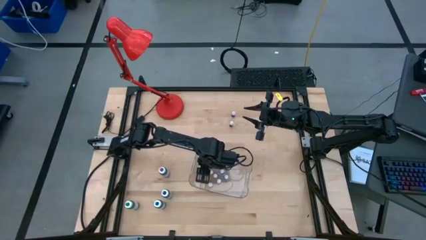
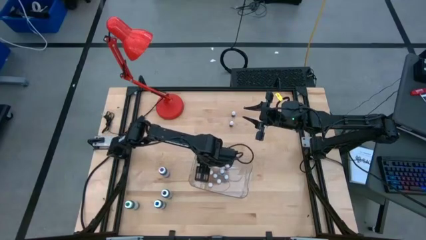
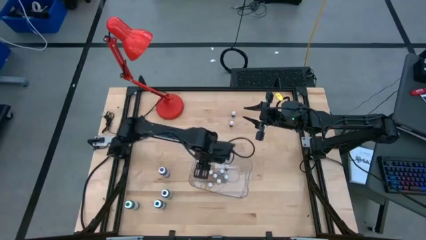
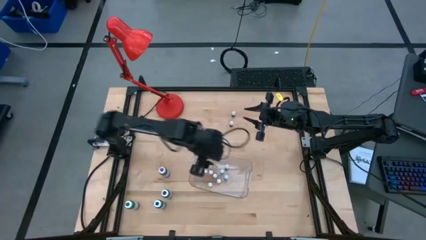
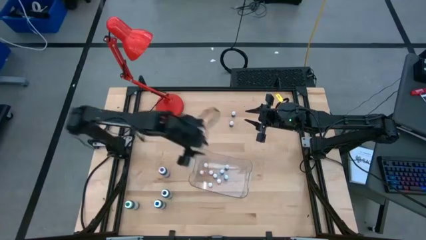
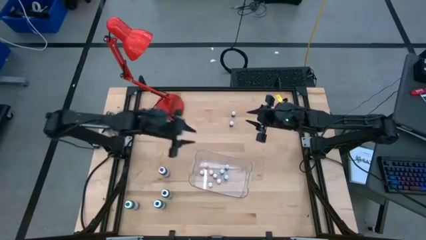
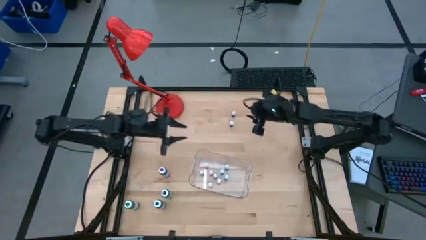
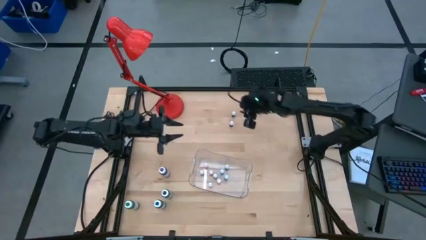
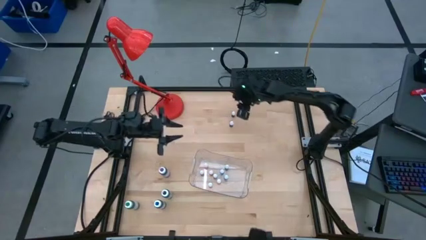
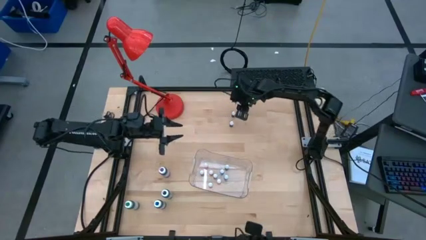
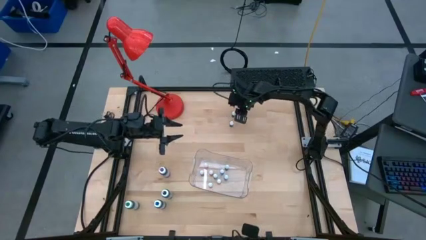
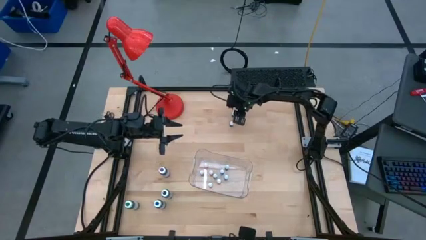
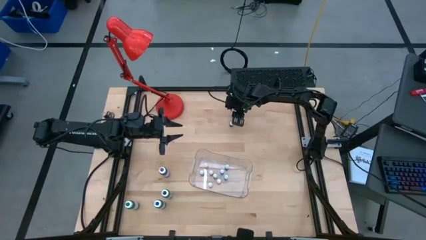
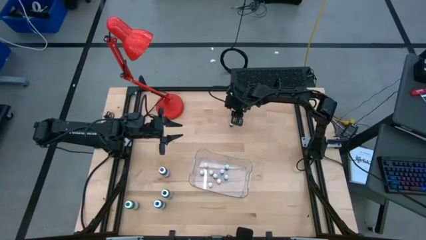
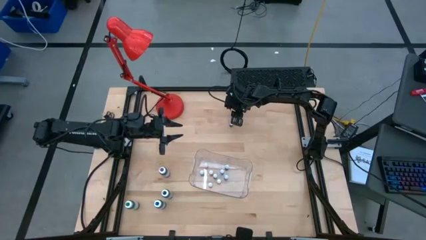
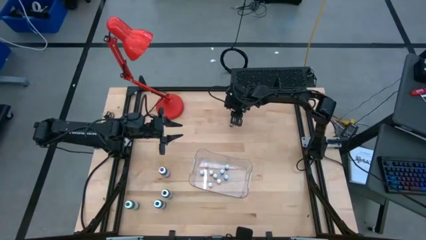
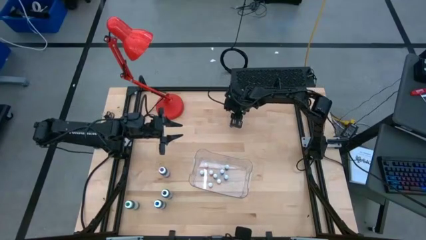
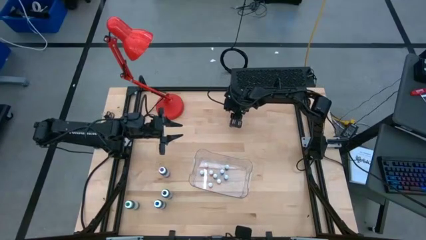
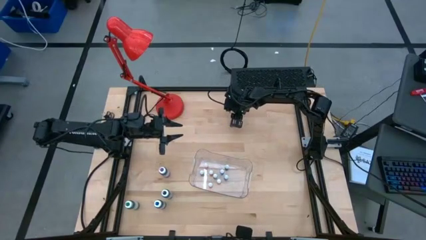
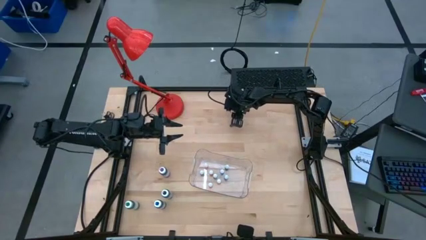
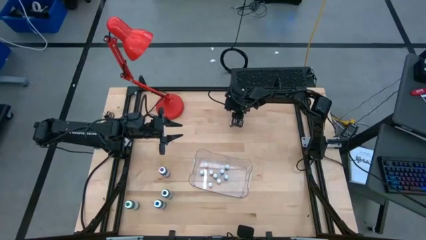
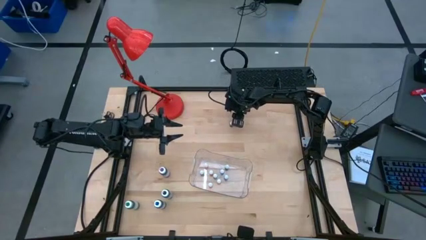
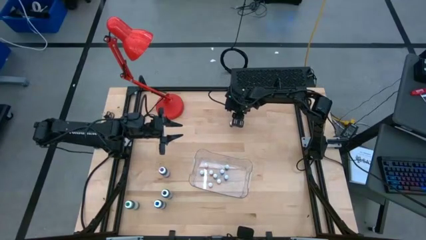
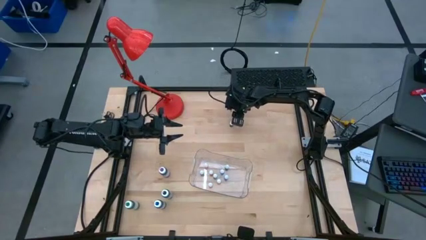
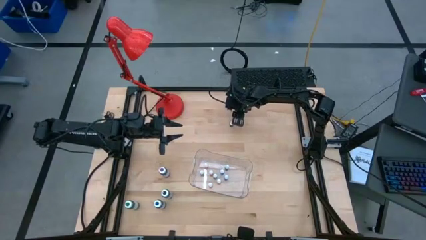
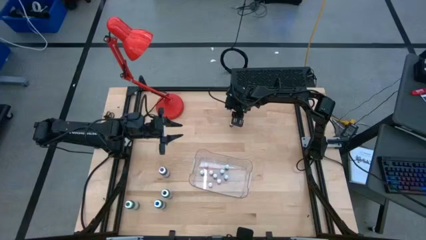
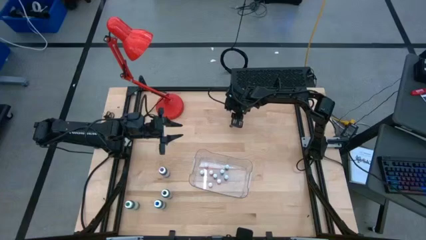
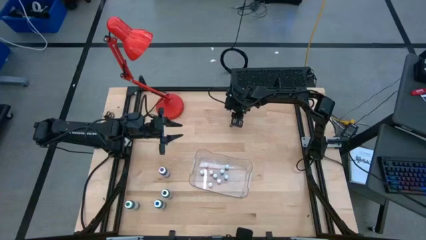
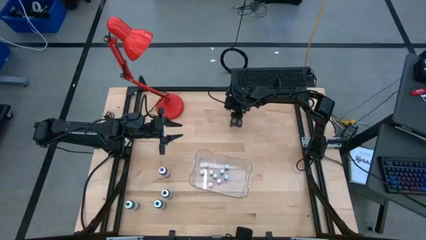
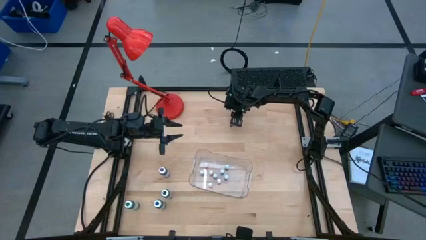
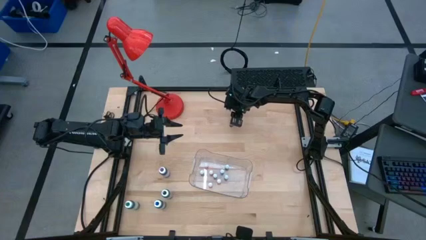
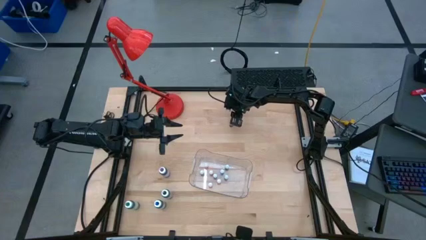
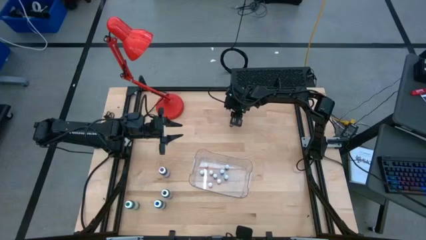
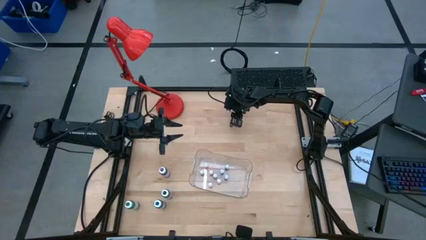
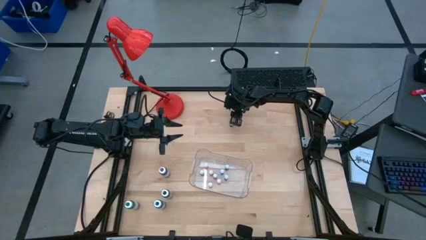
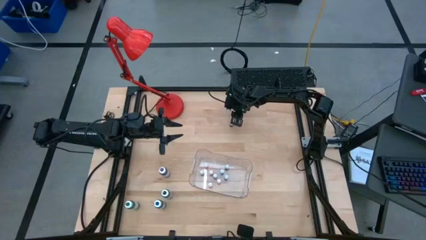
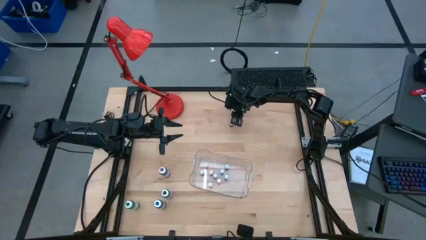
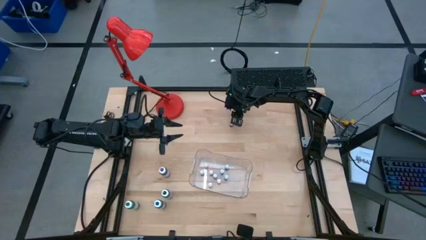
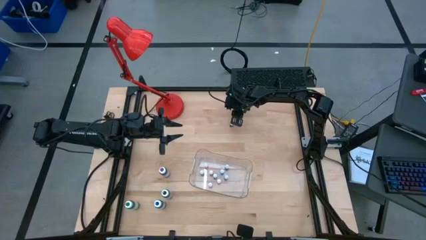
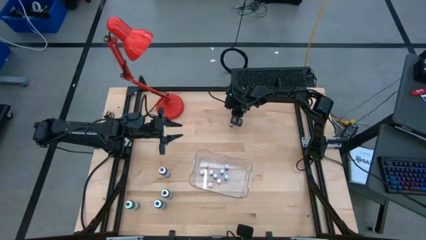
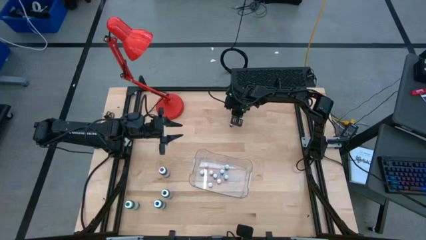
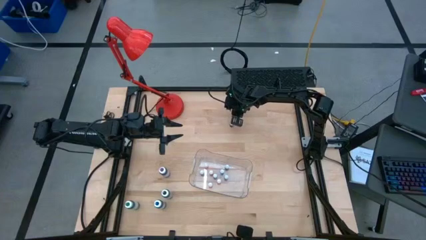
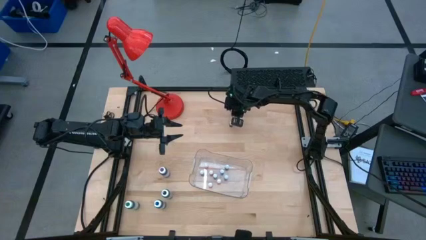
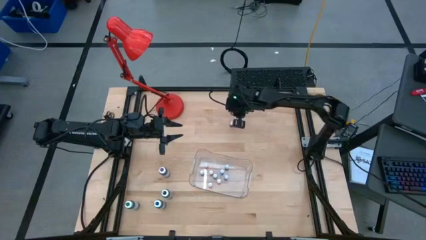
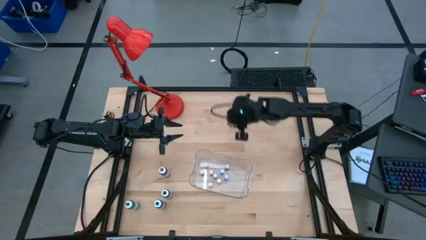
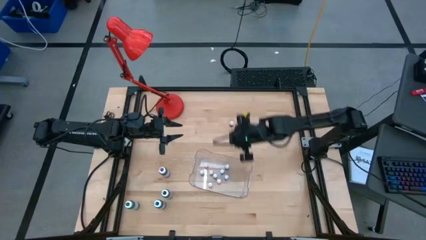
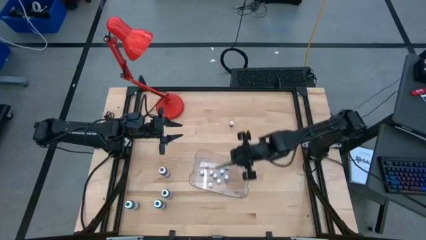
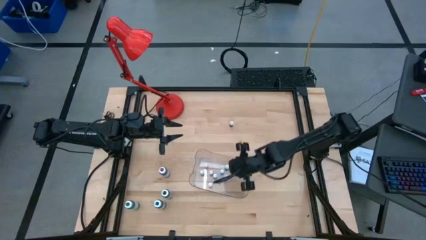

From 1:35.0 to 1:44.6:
Task: Pick & Place food coloring
Put the small blue food coloring bottle into the transparent bin

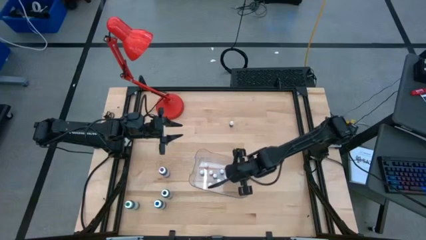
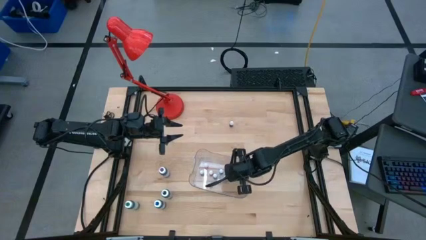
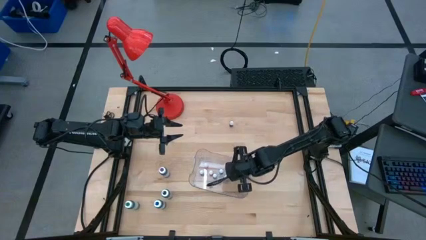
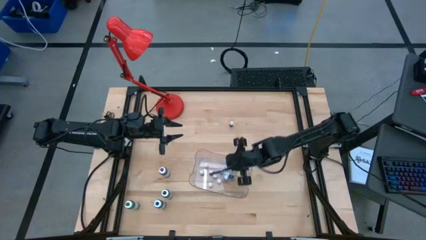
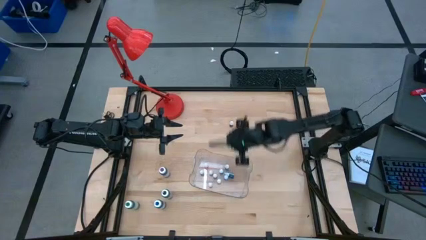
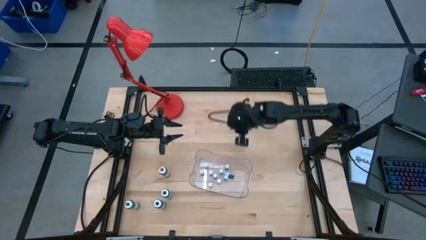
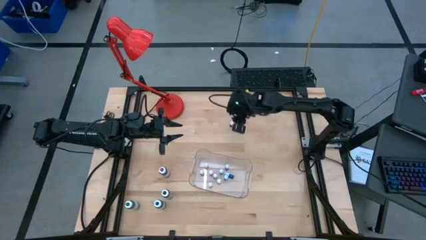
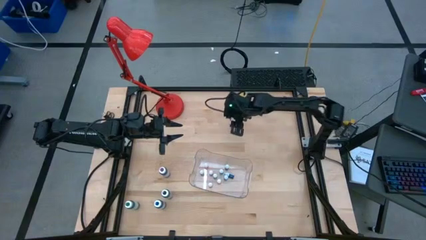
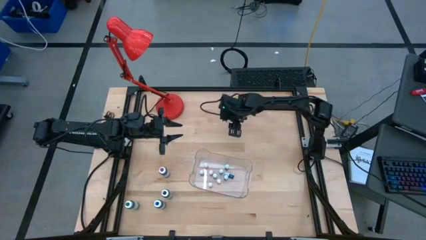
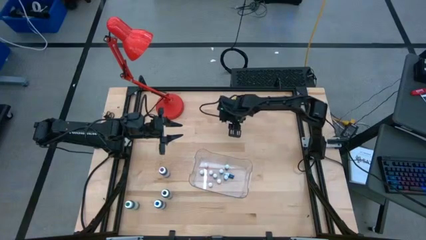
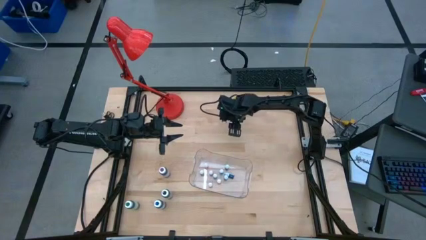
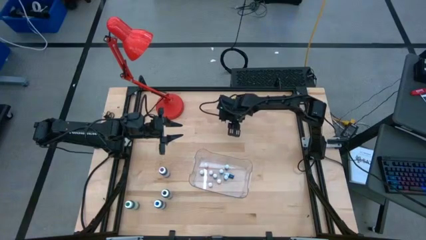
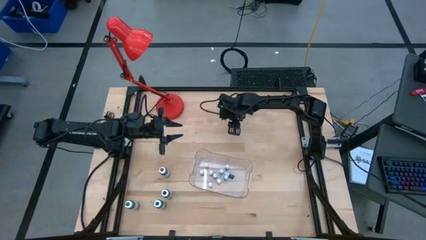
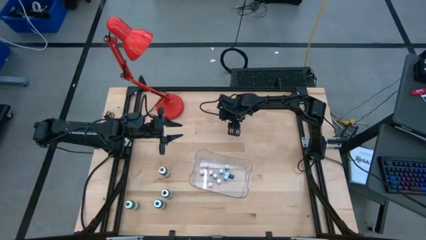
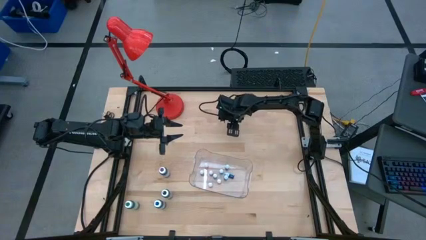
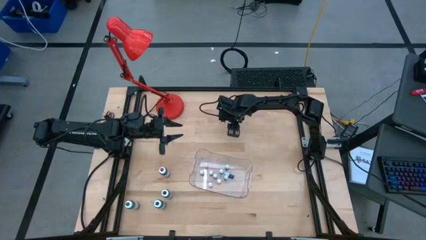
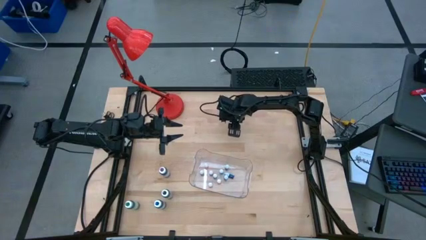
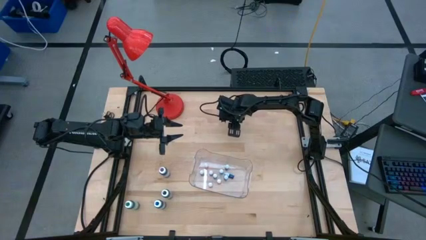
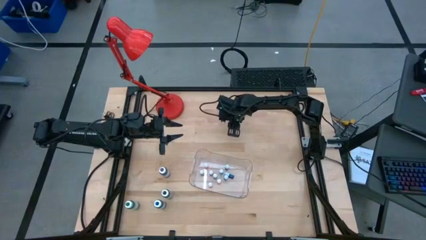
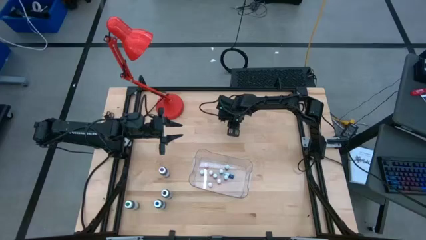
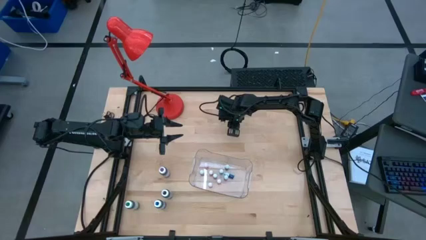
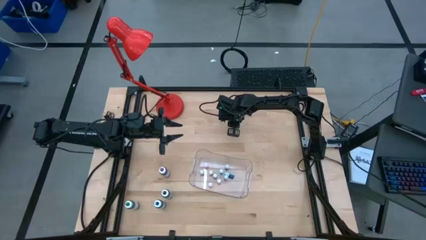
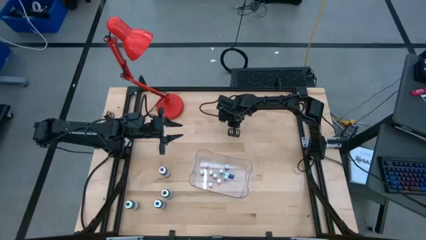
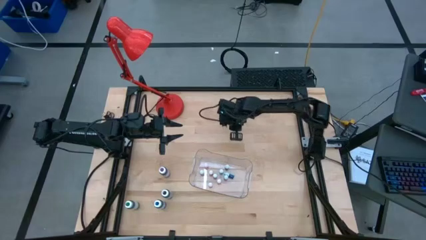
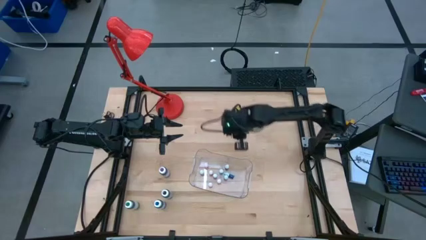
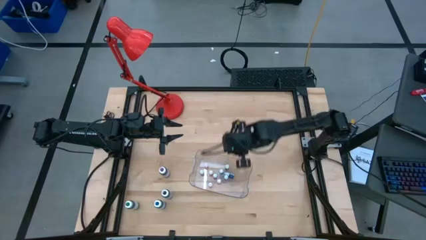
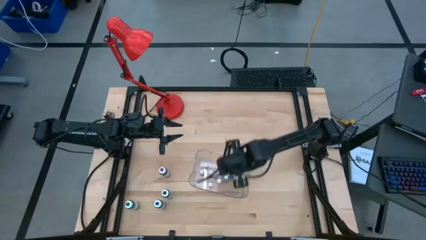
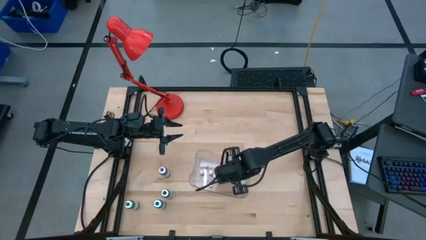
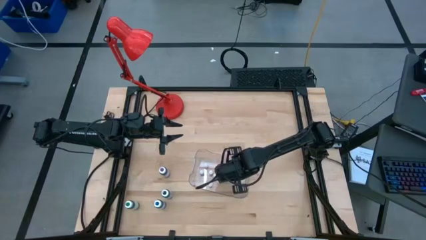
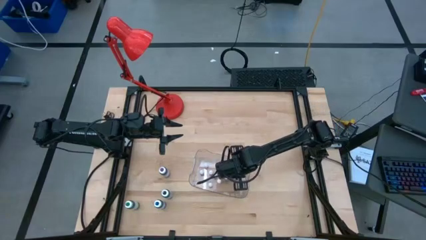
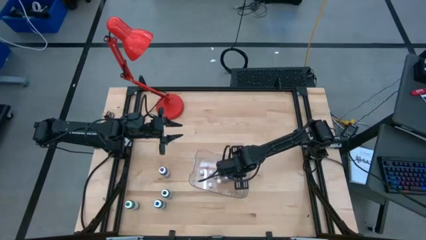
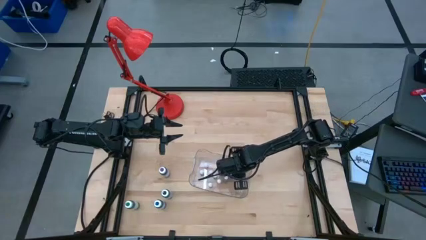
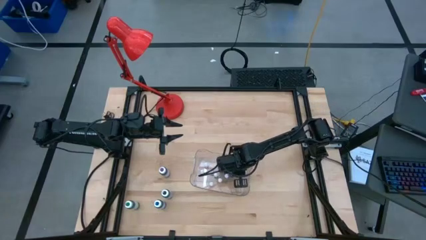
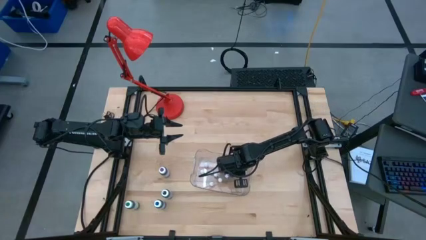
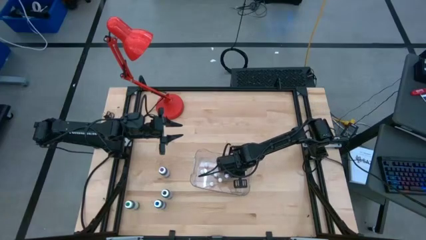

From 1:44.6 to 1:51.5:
Put the red food coloring bottle into the transparent bin
